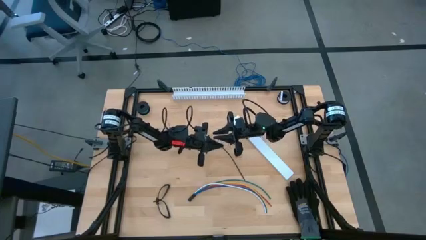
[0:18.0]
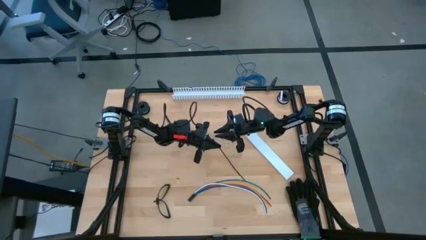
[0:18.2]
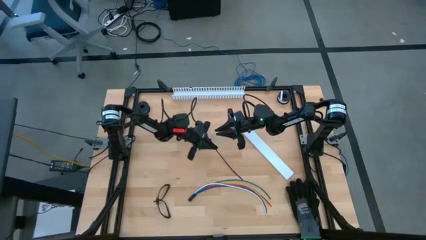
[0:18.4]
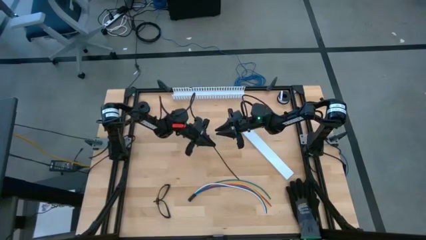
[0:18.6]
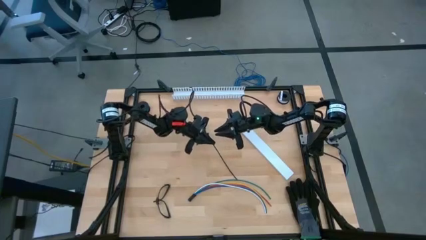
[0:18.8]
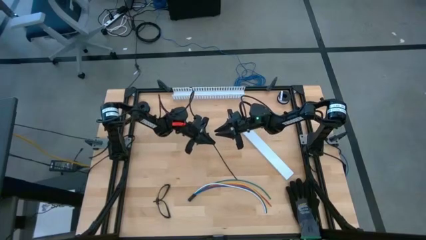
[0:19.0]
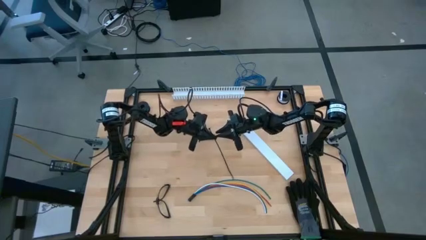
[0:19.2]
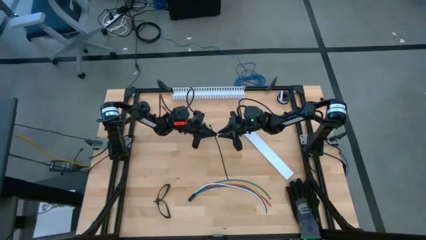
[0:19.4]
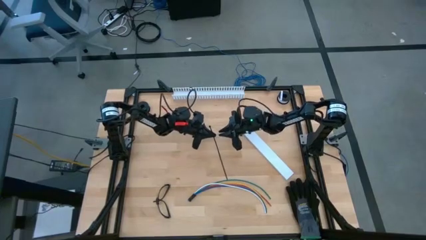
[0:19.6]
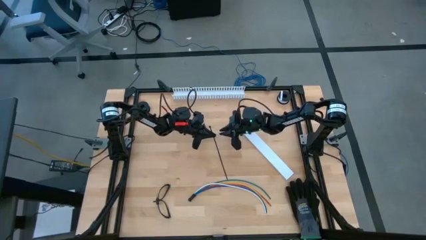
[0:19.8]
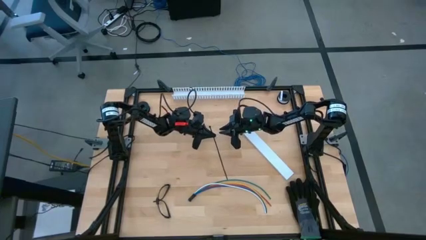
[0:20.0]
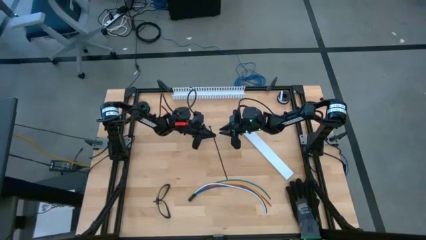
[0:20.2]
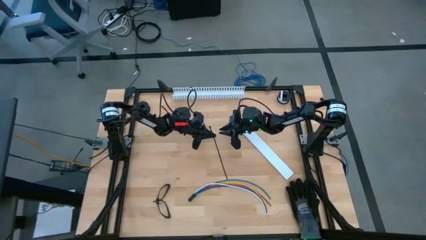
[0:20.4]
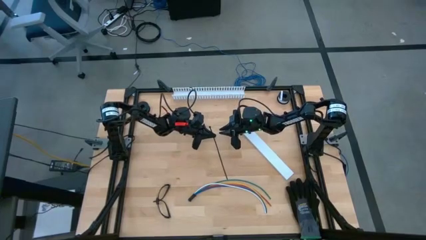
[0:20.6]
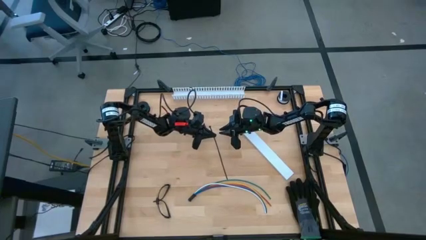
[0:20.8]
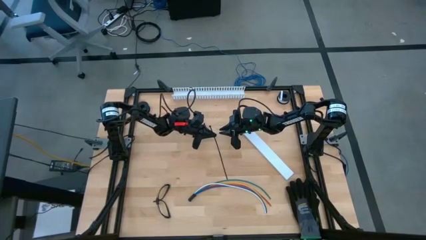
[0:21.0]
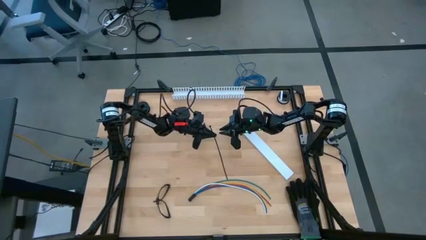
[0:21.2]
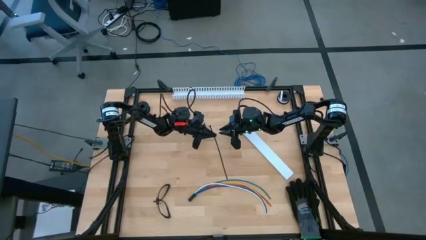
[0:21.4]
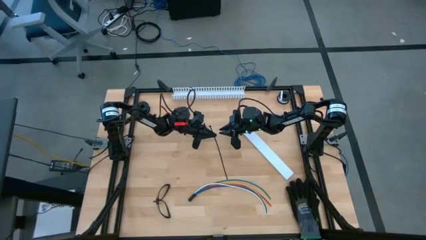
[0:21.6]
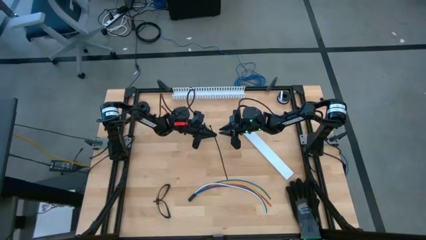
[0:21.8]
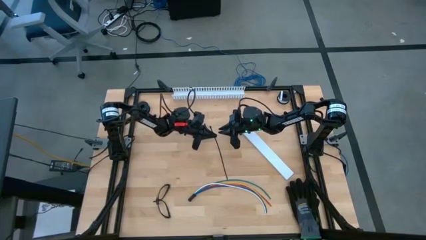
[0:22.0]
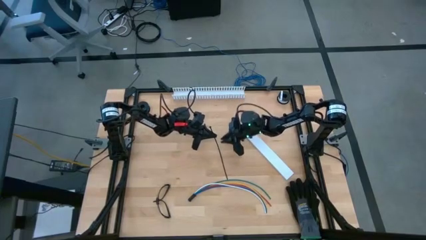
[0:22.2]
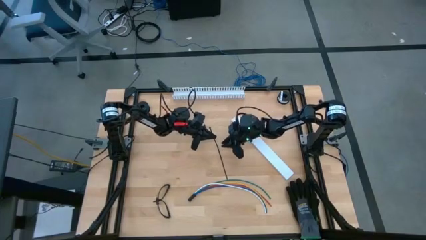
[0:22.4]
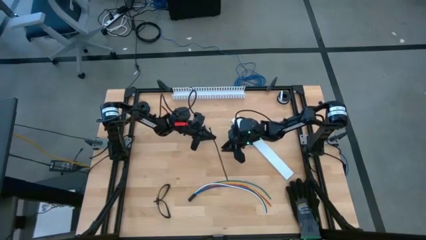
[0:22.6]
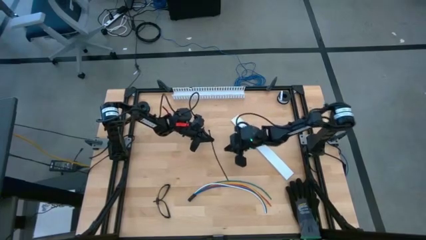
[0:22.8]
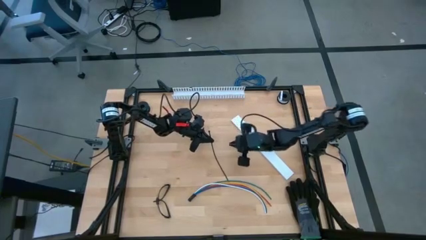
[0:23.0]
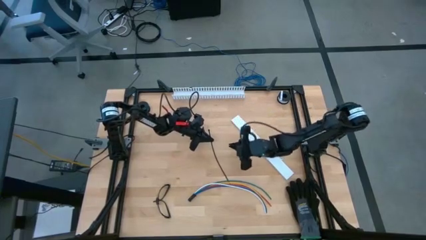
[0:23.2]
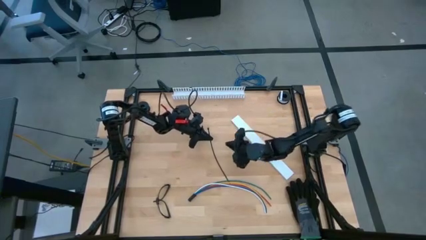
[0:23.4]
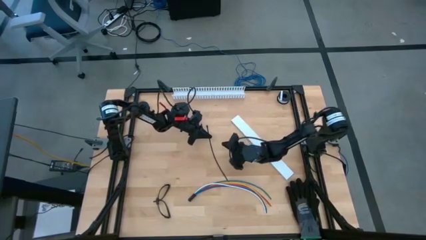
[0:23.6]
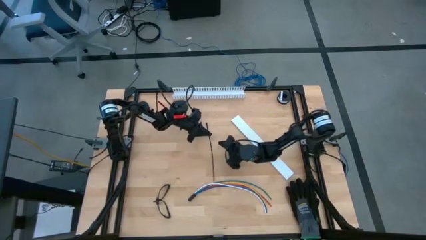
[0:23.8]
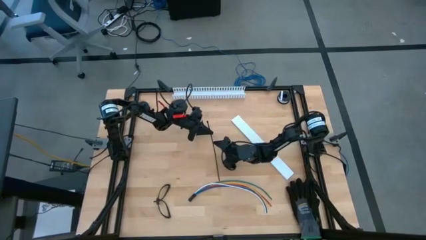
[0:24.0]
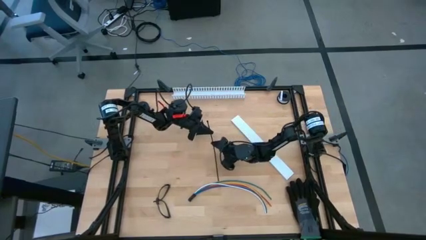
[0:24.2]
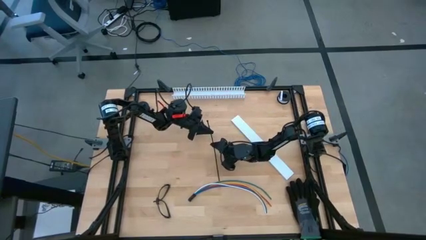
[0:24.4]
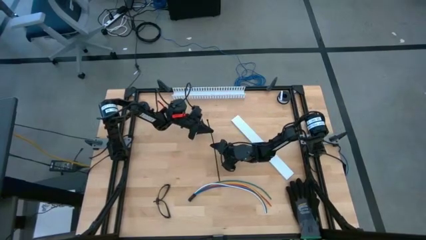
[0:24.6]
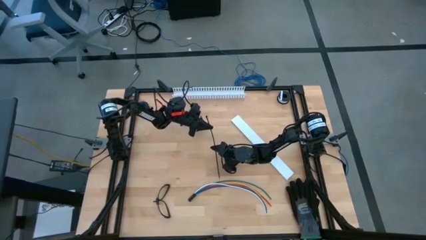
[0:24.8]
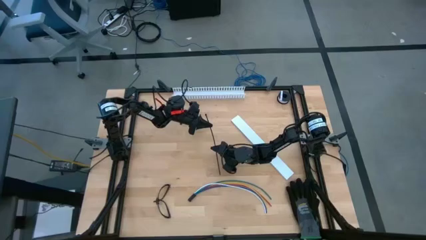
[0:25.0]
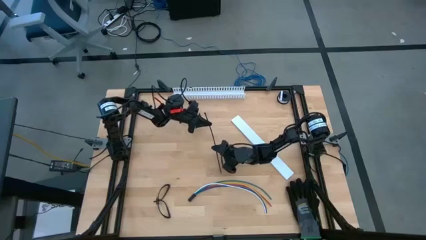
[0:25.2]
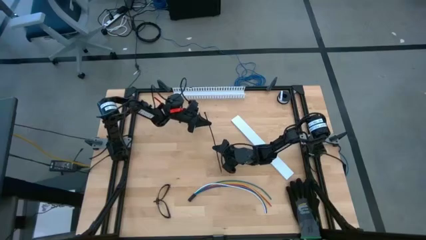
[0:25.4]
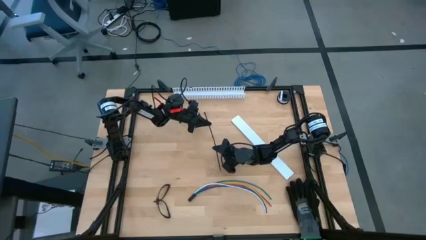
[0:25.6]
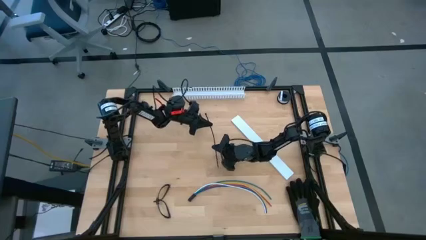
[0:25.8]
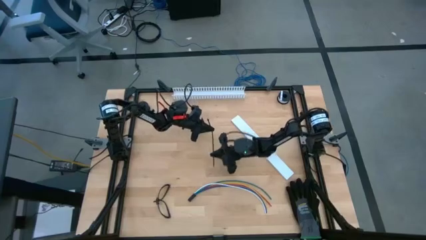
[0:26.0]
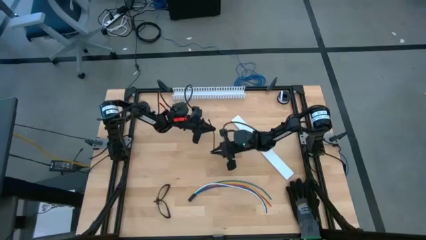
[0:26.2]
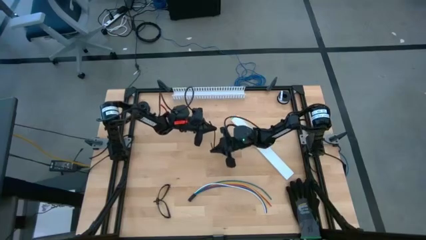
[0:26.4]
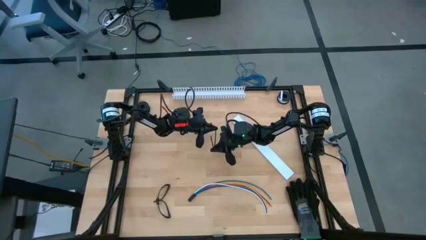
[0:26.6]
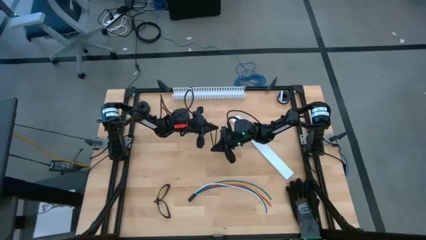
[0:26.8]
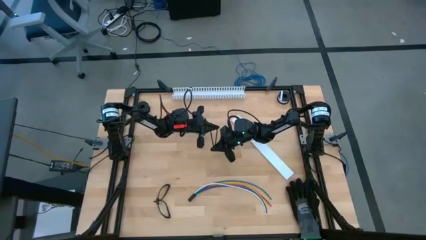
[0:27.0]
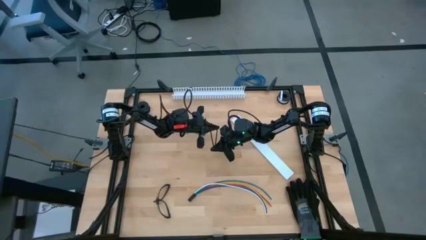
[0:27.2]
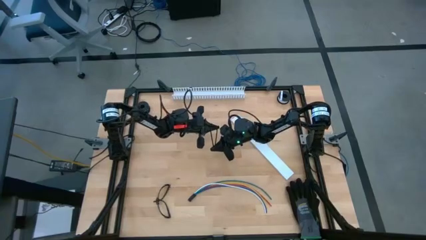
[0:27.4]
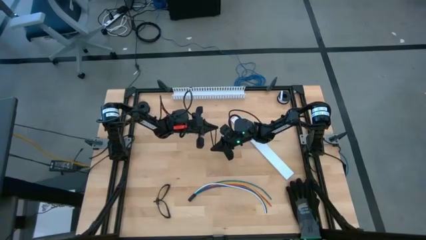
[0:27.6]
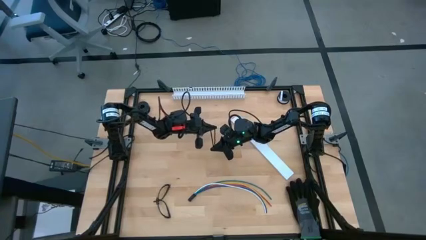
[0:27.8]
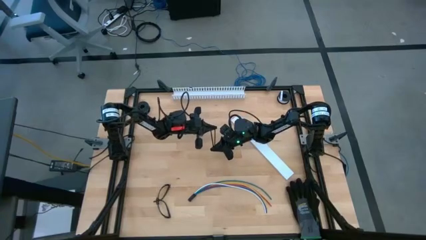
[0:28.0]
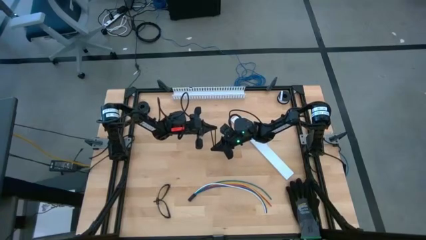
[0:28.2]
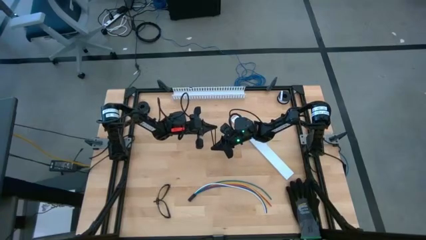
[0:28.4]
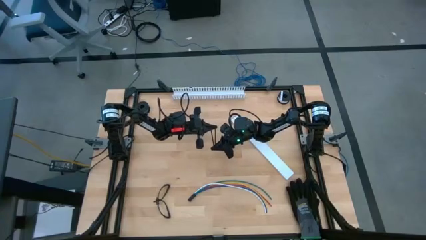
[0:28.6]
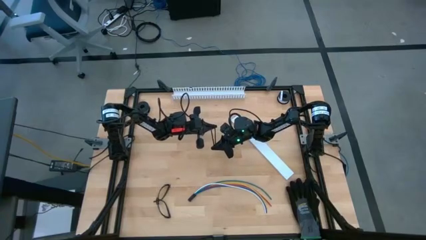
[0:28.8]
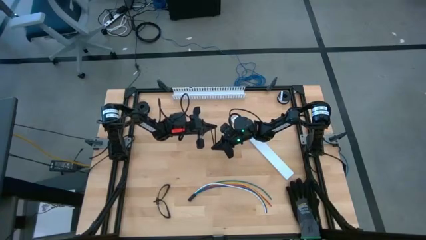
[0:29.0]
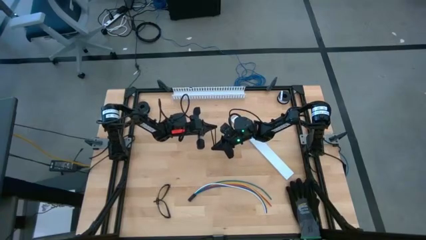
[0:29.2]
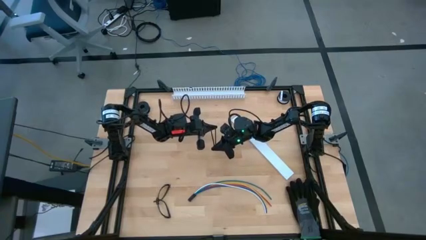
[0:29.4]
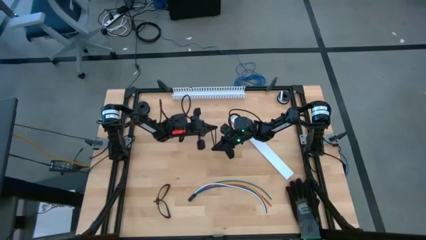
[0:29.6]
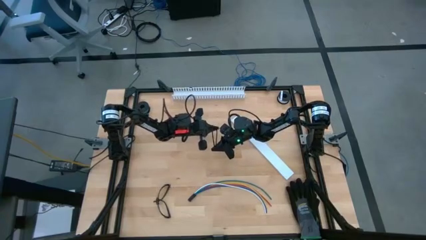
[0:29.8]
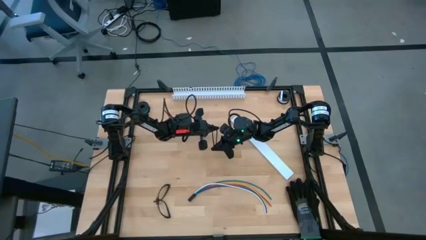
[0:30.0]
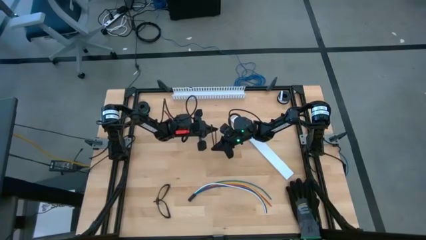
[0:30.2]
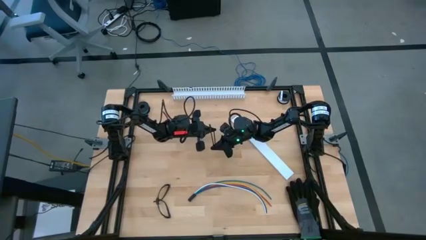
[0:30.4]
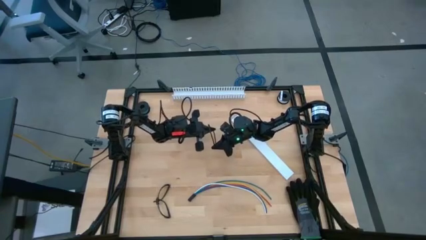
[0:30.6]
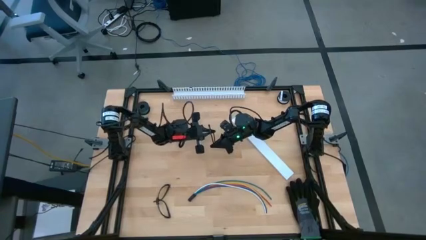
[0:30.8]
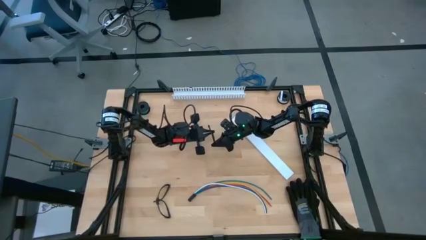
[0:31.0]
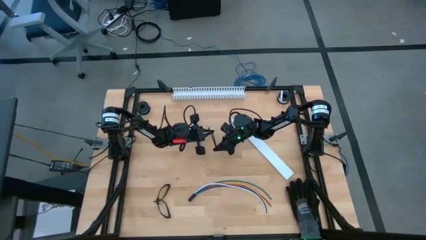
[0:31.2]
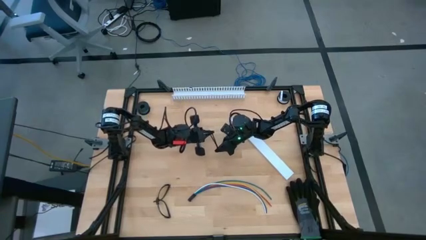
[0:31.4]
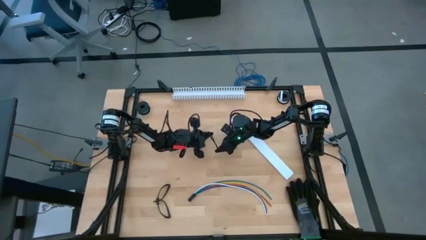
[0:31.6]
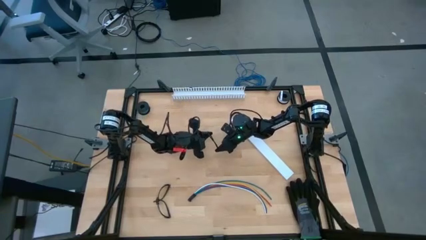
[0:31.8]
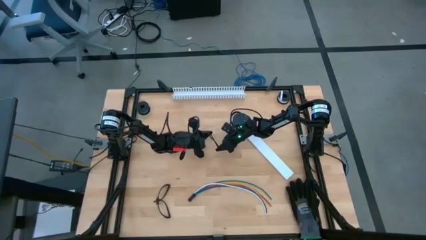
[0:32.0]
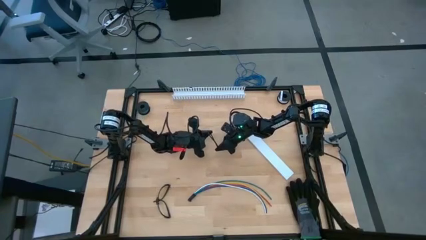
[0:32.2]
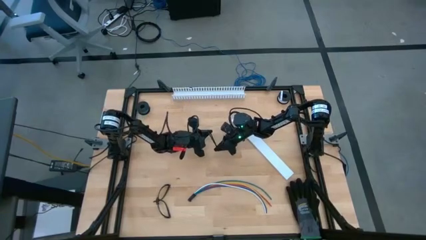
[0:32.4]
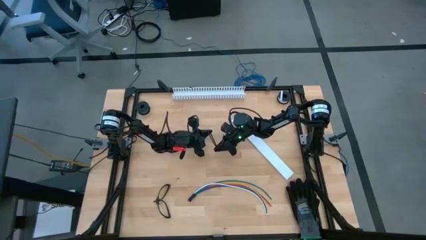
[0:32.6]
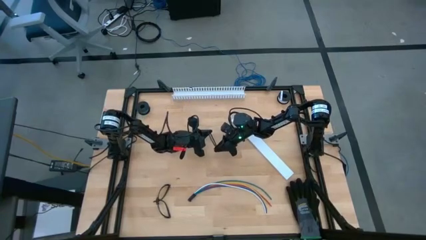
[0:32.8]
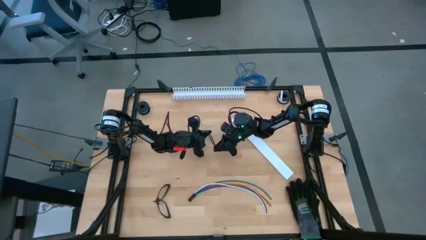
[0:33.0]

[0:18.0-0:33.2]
Task: Ziptie cables
Wrap the zip tie around the cable wires
